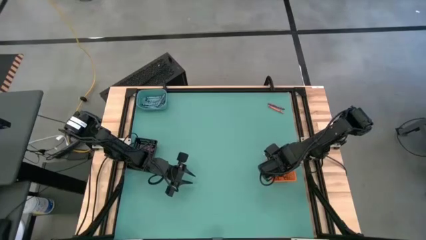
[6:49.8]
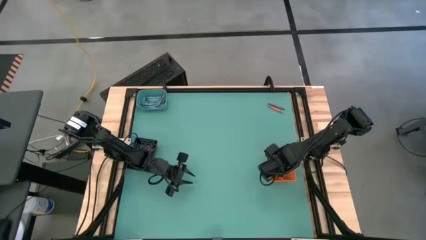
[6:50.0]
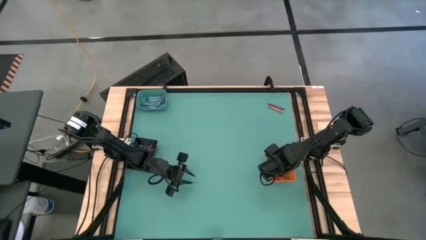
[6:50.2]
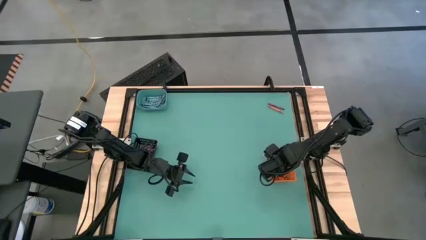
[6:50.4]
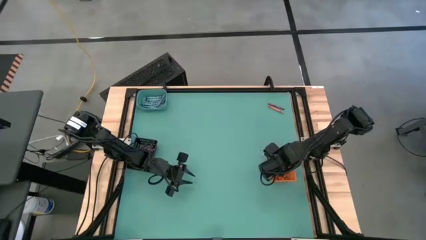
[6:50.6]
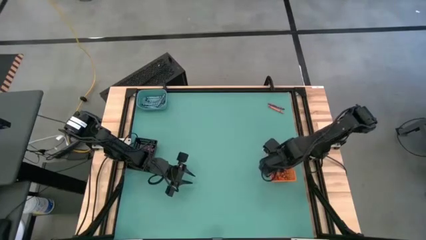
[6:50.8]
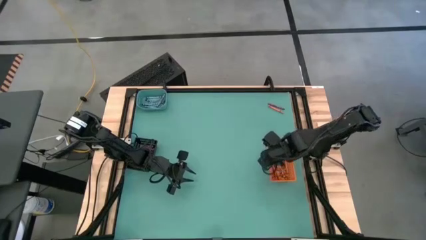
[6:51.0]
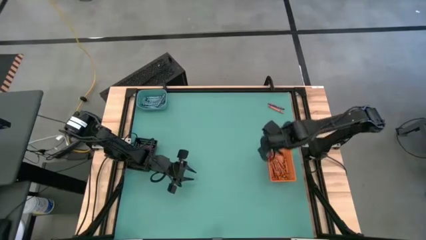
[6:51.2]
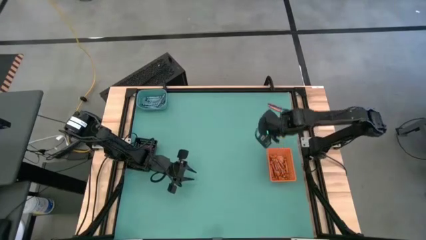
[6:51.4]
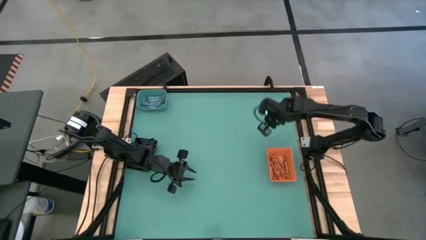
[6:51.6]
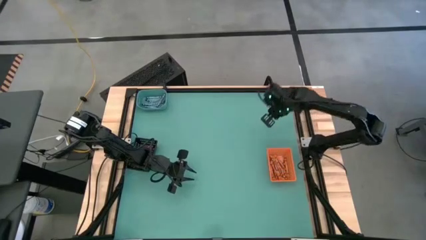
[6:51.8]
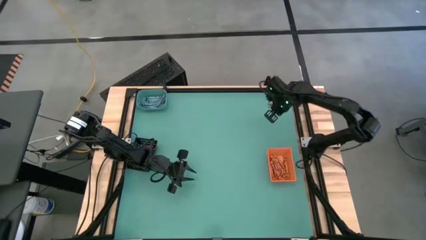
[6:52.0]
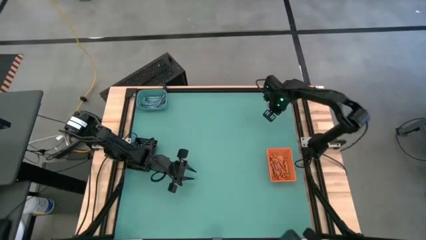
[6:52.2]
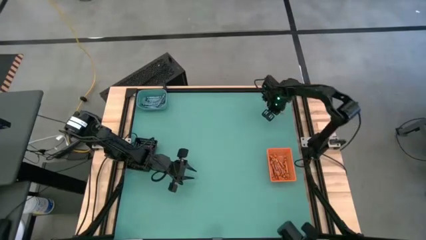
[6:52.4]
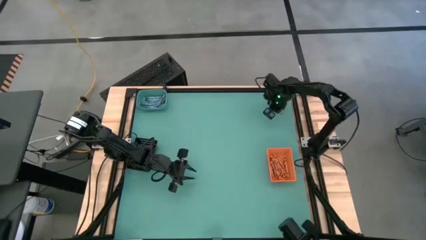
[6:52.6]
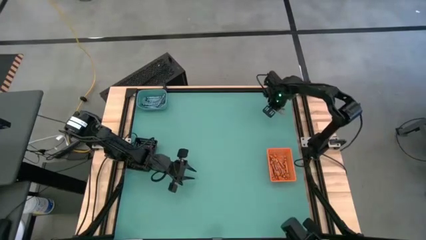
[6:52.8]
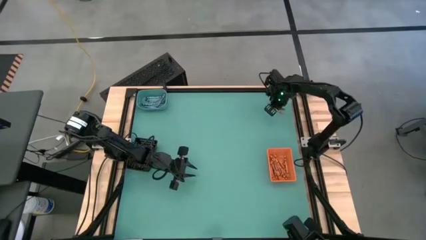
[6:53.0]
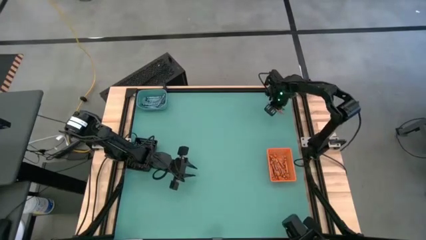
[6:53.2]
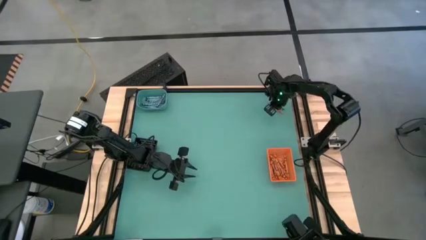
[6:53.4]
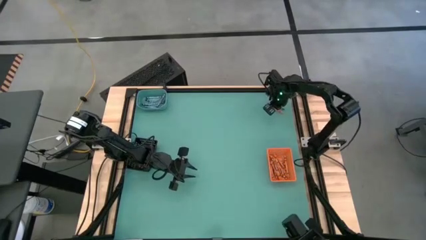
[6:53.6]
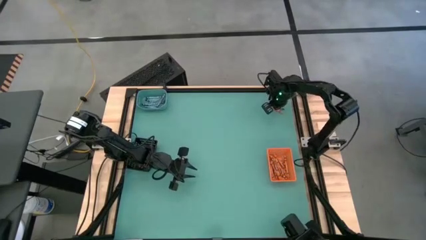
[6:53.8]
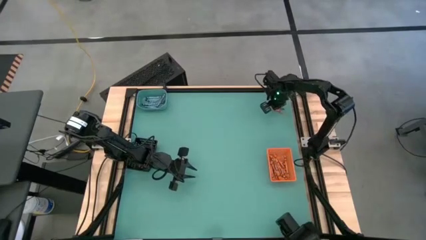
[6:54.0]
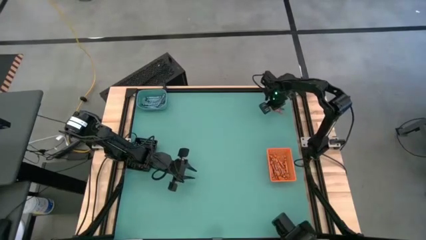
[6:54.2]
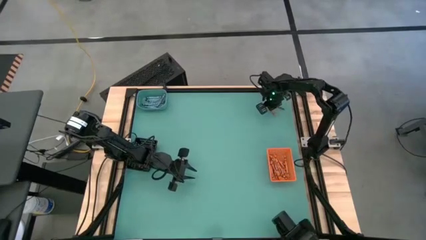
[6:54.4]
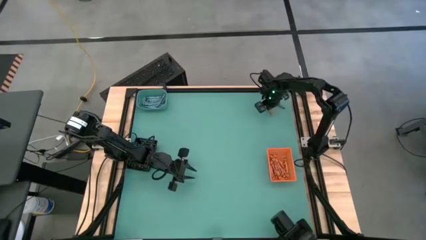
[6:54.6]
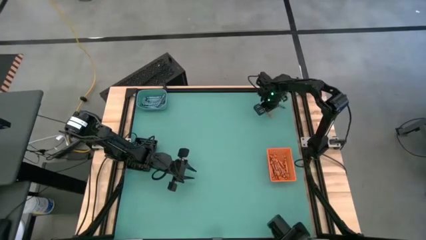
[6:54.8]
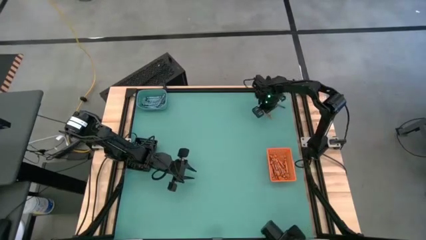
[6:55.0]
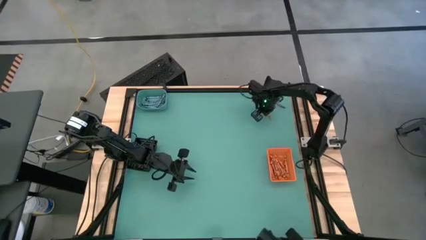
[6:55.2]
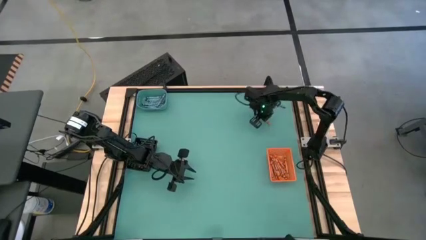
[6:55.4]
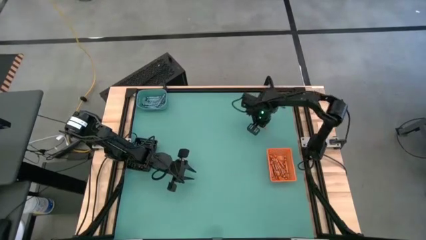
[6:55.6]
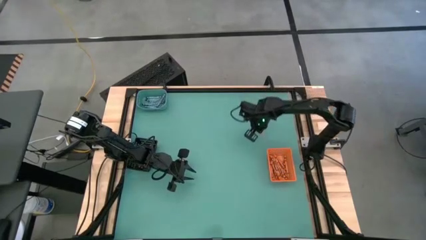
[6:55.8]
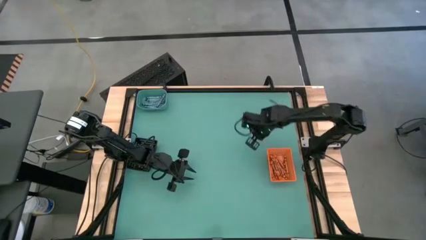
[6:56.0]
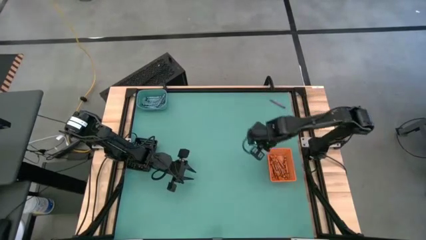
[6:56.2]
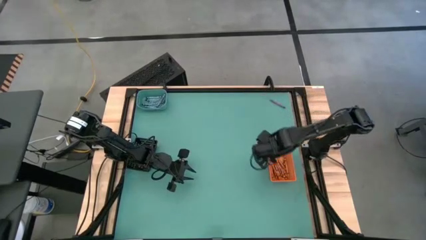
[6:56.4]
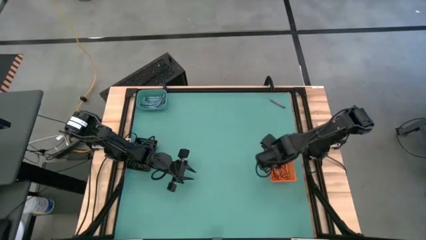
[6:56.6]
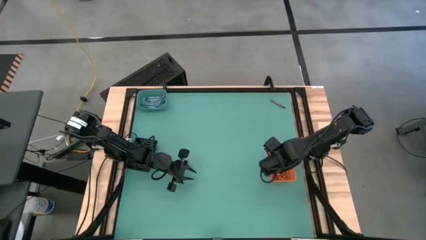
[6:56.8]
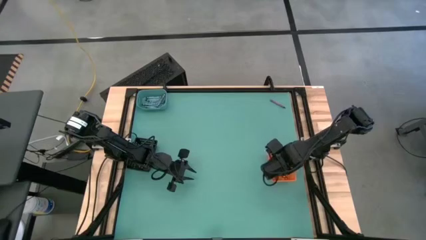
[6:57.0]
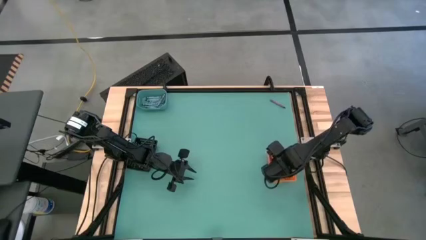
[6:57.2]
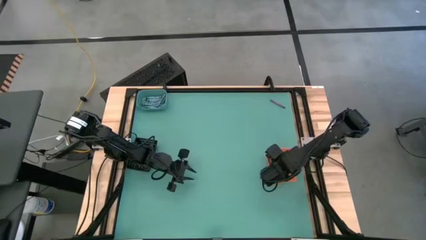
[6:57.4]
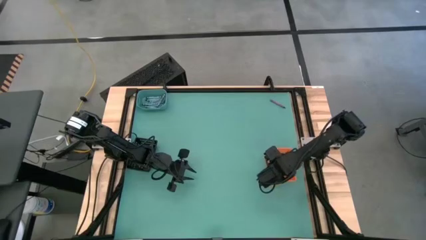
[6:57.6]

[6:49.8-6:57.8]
Task: Sort crayons
Put the orange crayon into the orange bin

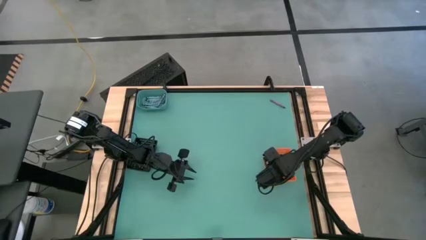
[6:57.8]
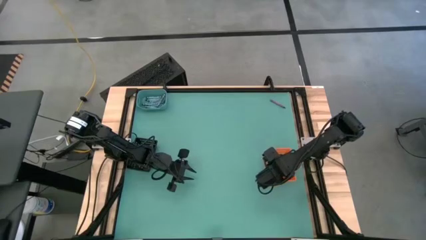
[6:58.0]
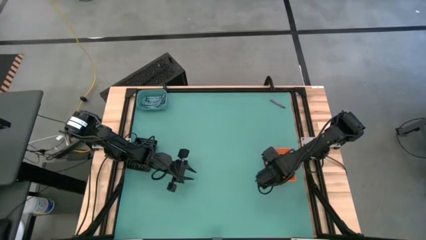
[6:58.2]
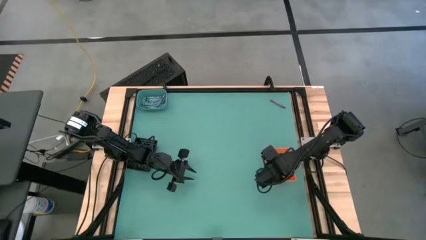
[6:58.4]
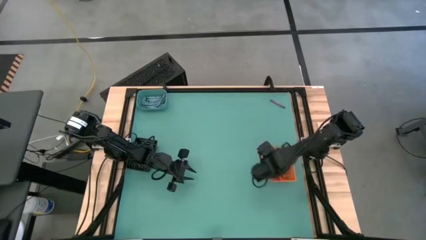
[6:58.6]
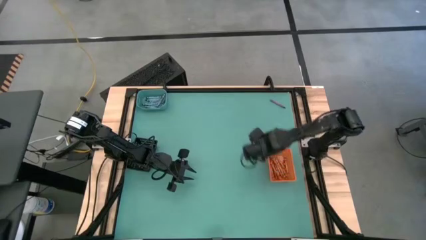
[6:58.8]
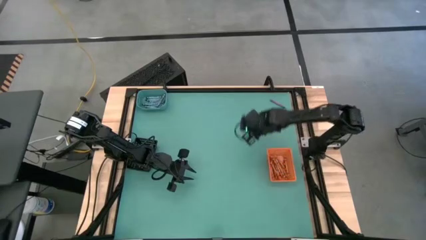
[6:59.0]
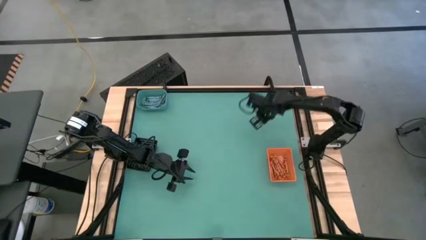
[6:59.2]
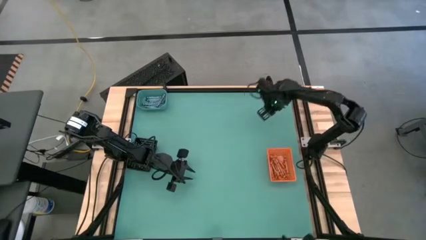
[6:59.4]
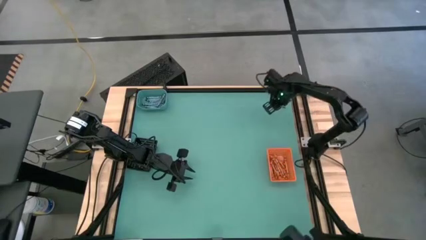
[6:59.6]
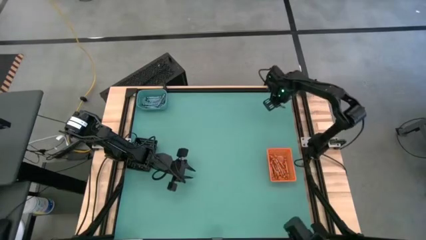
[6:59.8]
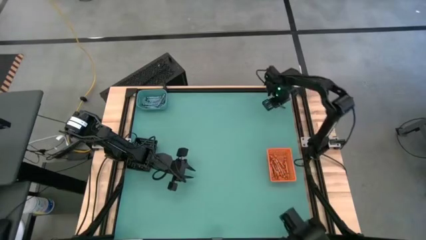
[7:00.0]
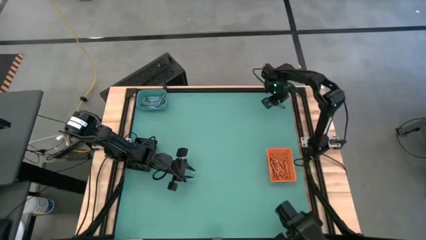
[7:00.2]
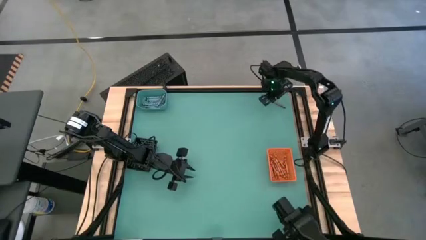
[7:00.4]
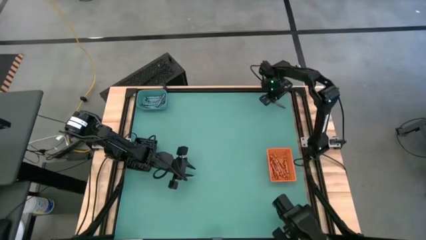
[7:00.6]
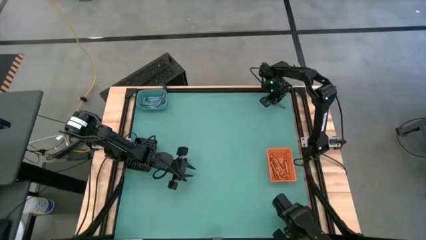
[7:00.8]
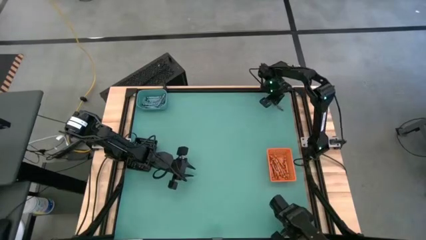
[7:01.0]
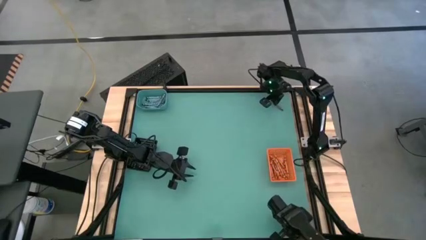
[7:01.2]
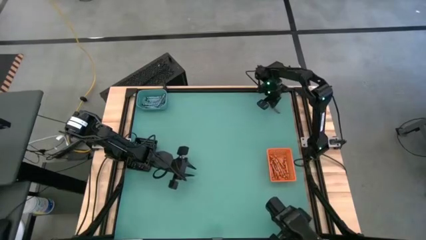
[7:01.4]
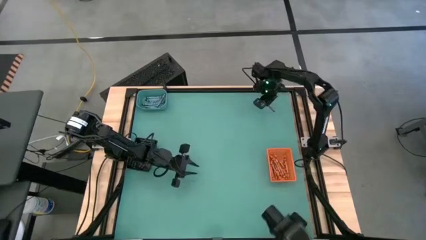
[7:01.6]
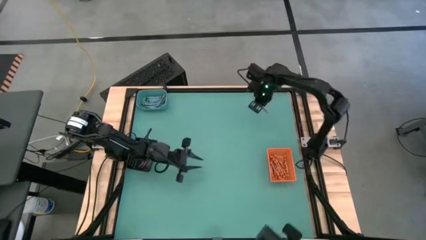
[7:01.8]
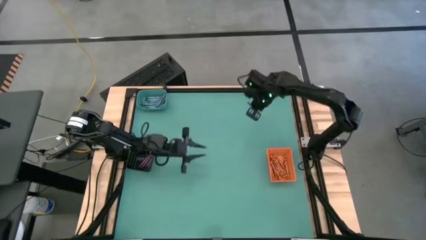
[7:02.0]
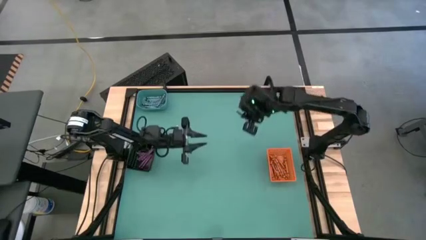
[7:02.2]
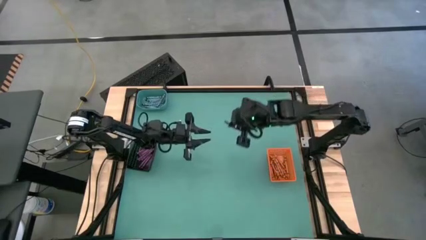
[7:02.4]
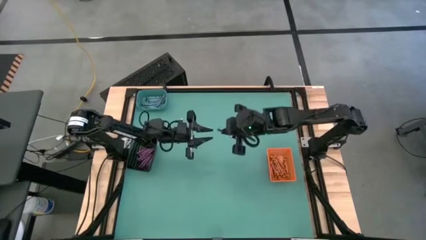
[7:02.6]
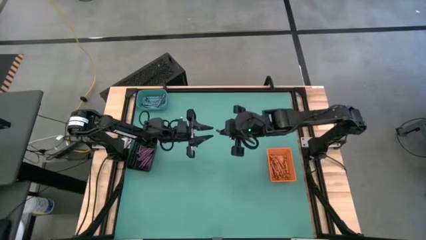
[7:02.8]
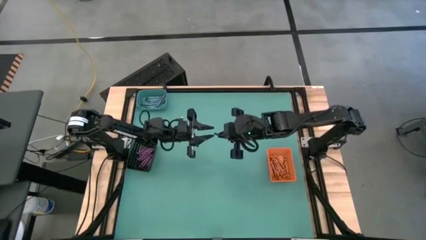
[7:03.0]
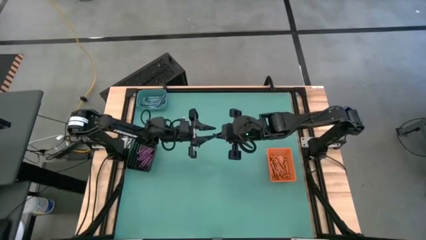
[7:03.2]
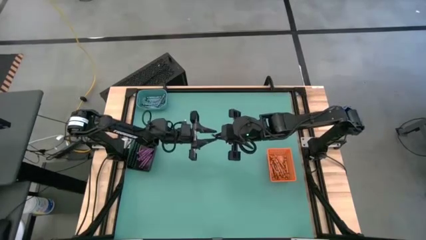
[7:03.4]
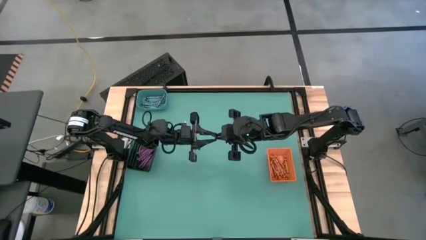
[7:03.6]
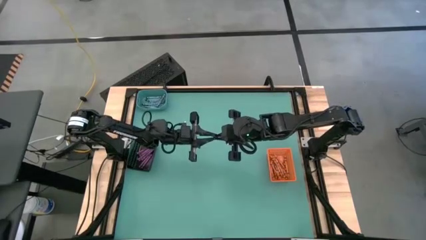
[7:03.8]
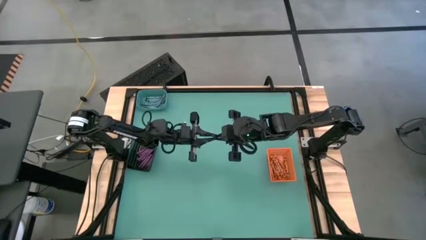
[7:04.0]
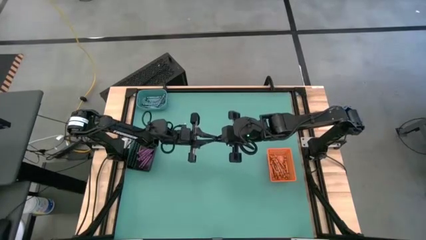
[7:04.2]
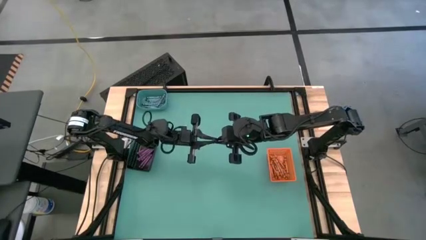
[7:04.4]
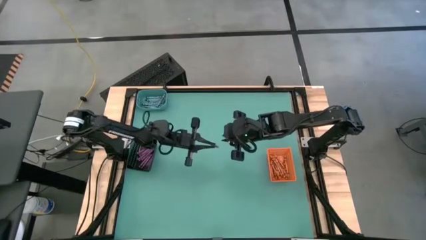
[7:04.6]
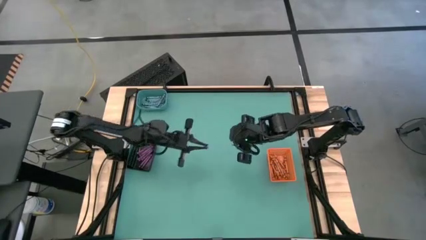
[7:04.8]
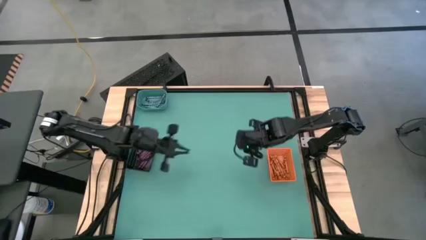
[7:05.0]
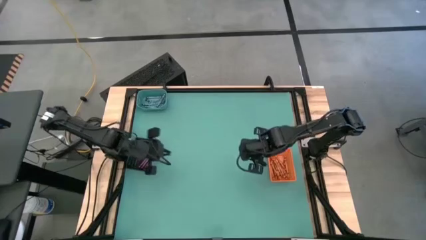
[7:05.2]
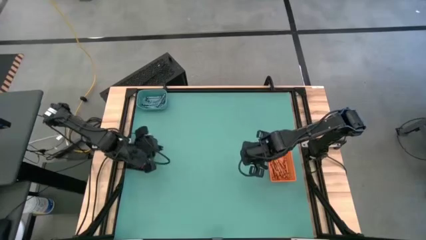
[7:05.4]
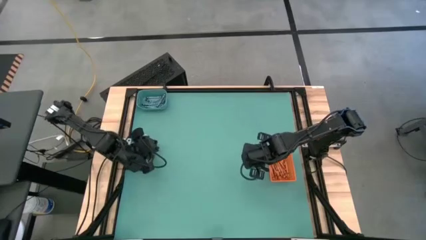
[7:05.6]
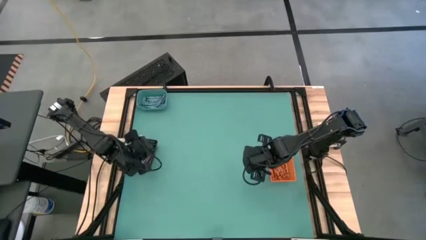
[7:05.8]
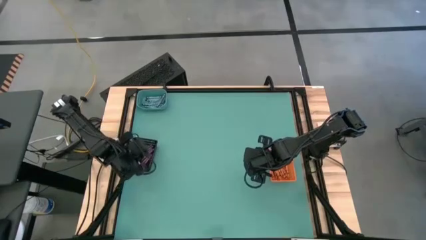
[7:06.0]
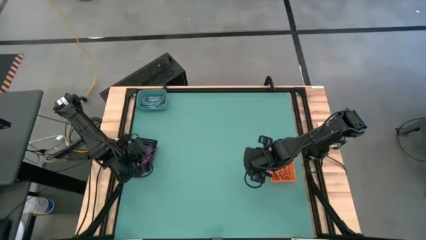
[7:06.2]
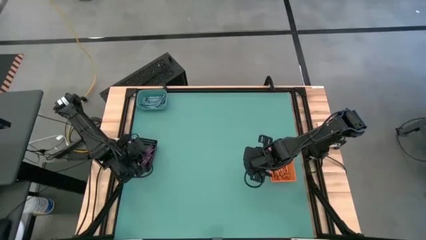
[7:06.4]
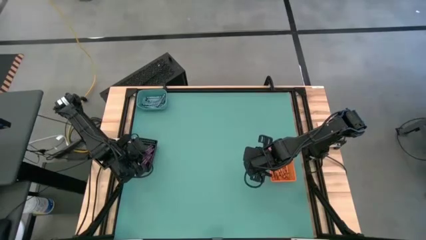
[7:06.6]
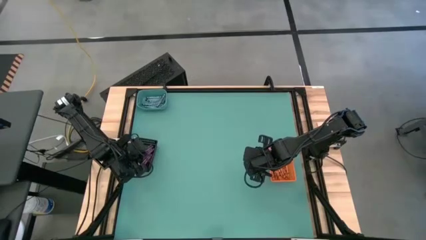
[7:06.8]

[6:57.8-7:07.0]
Put the purple crayon into the black bin
